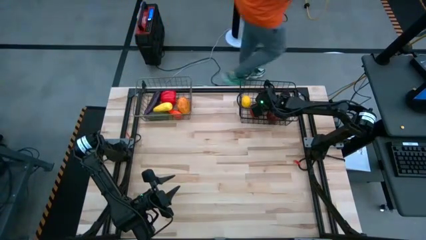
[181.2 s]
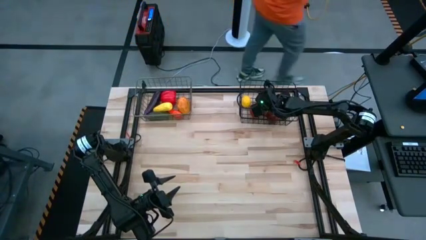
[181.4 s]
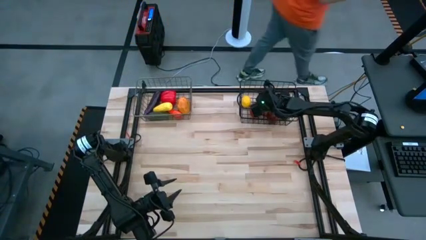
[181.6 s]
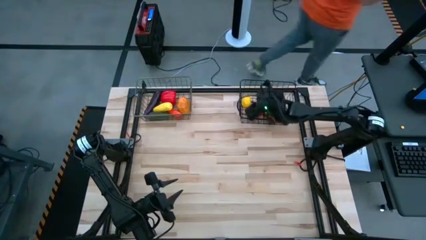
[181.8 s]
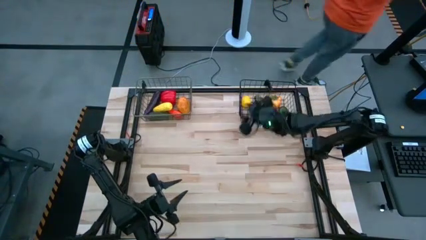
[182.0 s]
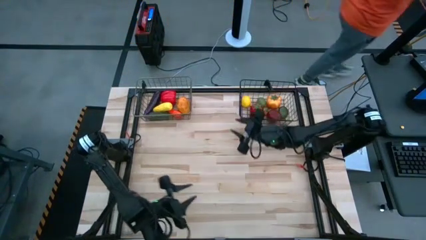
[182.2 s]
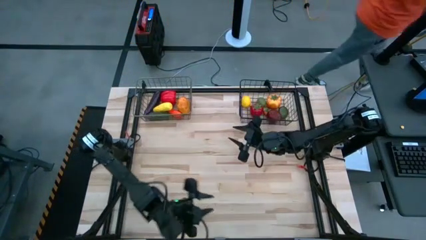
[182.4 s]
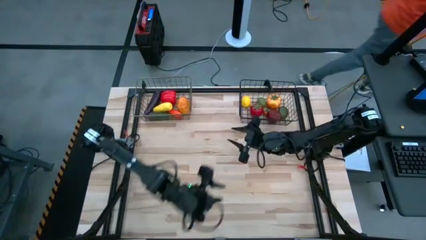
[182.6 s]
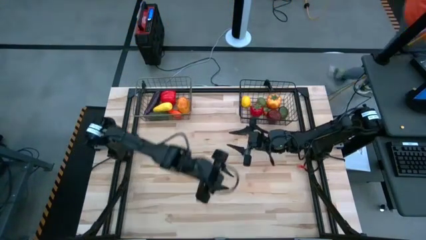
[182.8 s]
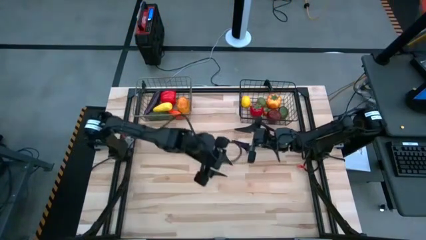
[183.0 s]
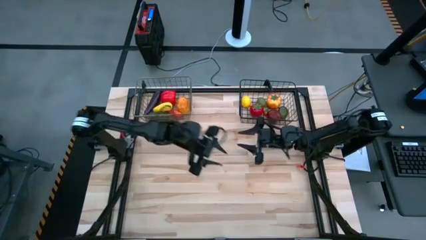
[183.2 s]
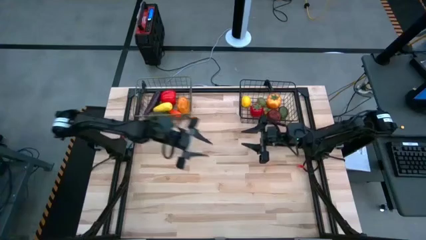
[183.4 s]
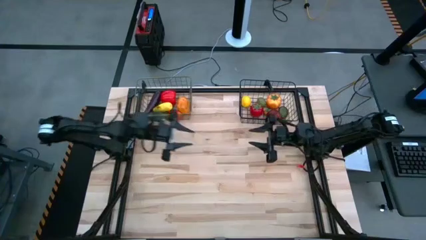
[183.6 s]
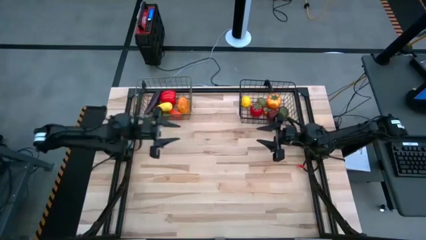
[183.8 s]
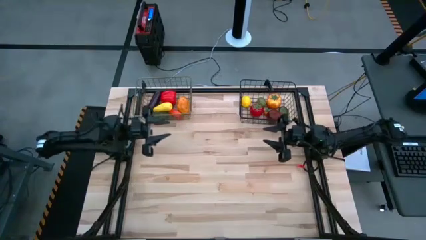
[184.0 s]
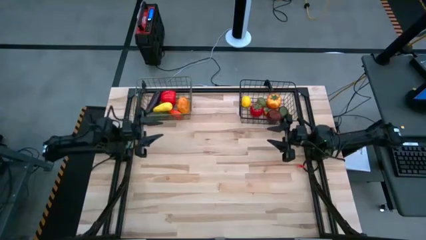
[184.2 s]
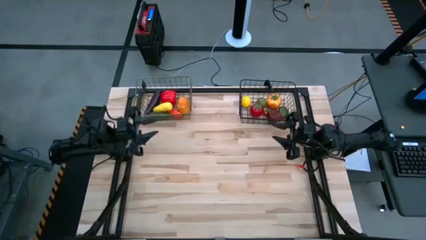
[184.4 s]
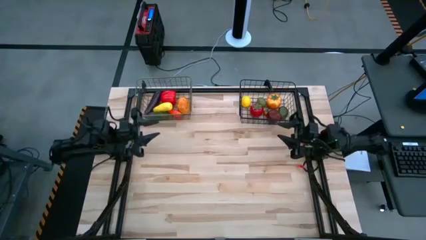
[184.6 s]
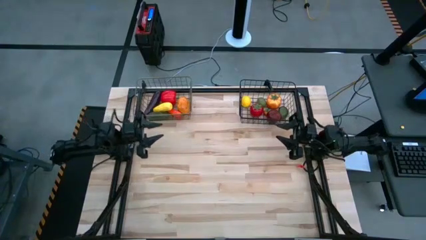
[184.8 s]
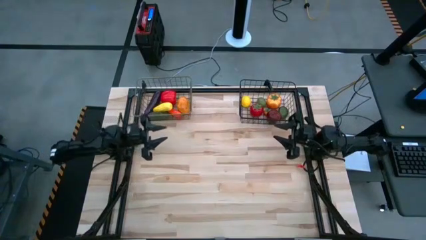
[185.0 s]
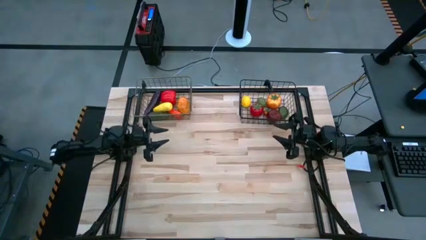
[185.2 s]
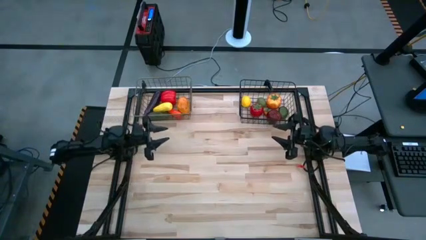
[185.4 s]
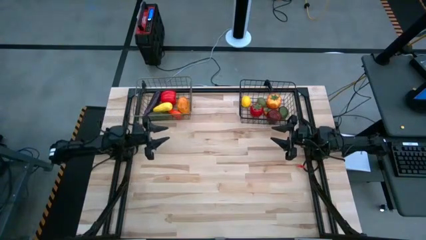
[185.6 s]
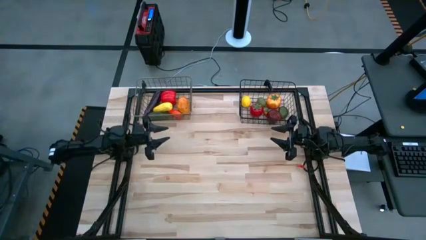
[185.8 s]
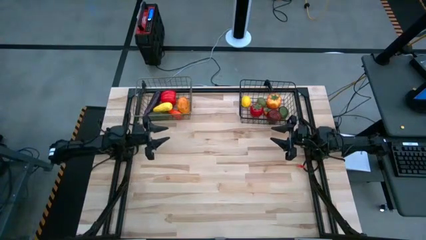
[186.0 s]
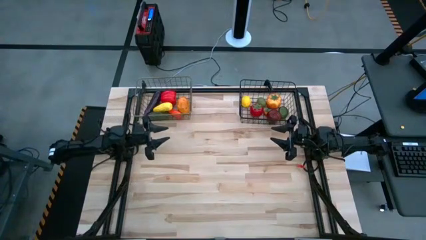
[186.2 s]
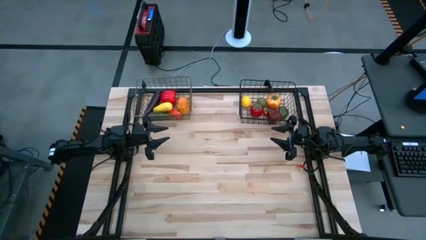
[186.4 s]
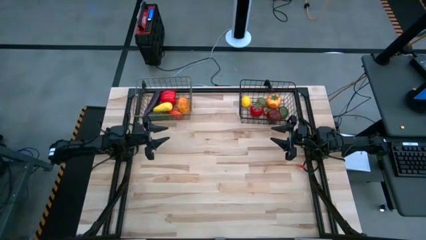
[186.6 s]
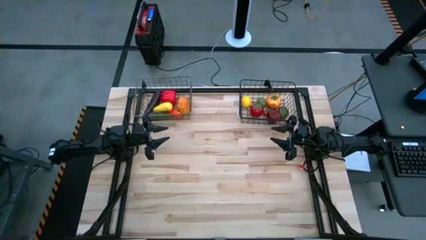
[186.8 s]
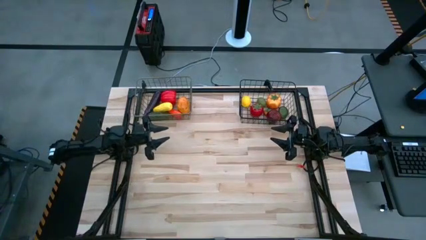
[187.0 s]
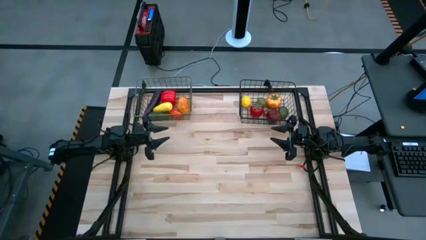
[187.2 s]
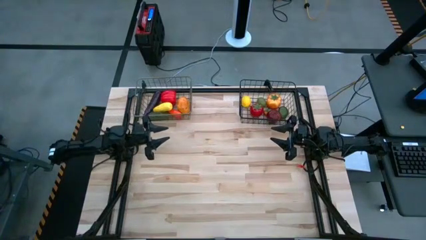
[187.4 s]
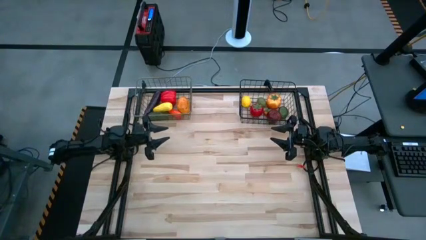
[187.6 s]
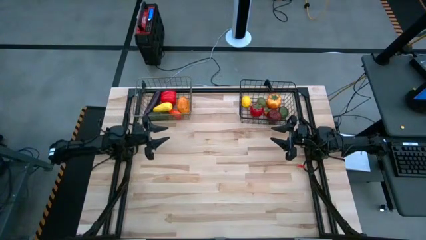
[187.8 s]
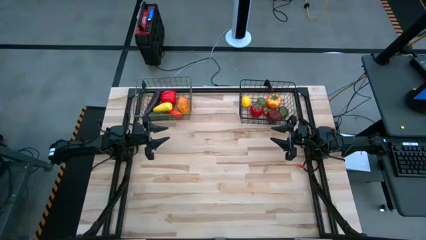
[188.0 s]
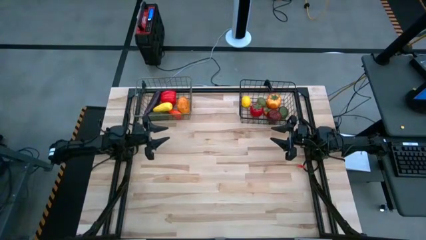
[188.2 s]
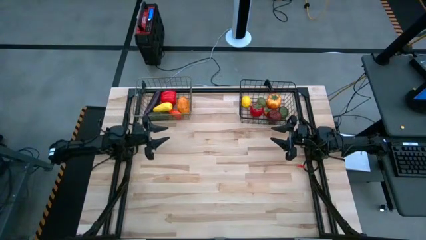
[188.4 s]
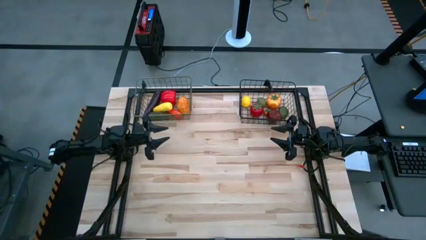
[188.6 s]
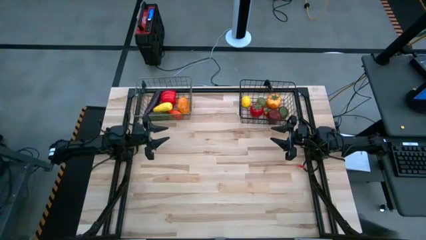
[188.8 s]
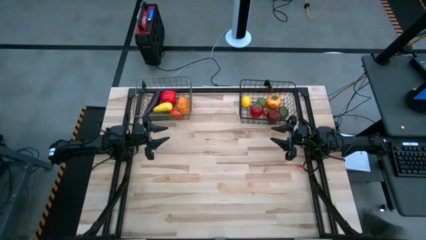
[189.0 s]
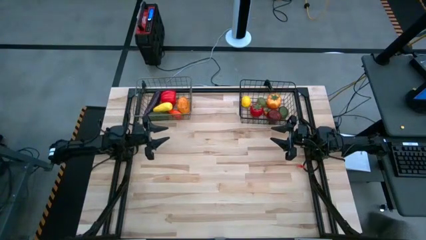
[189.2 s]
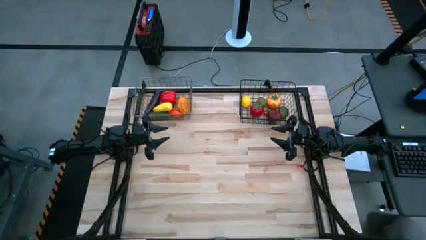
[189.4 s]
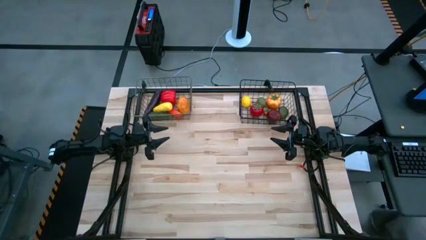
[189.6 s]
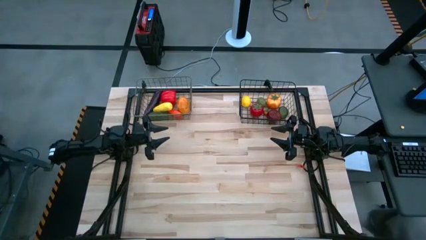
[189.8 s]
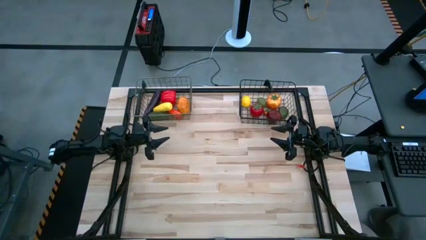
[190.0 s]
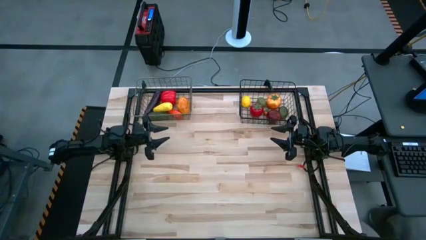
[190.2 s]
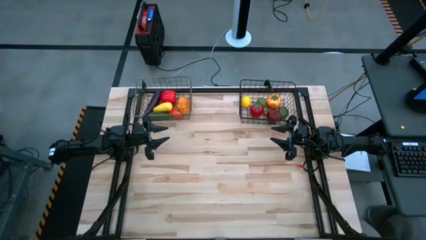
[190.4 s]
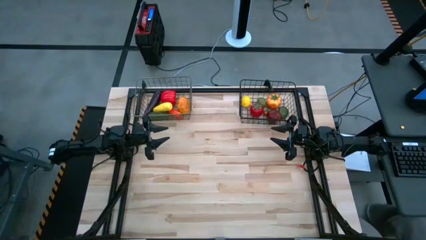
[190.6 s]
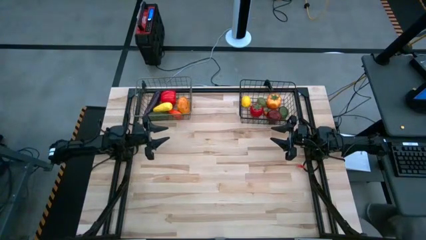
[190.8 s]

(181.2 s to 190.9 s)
Task: Sort produce into baskets
Return to Home Position

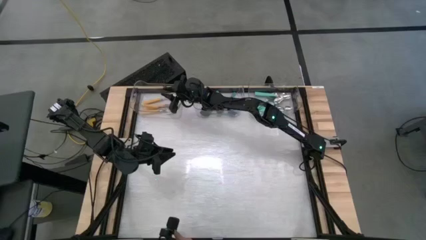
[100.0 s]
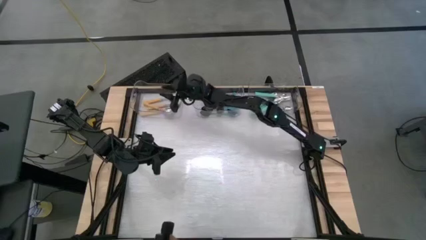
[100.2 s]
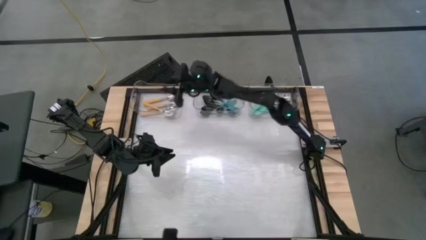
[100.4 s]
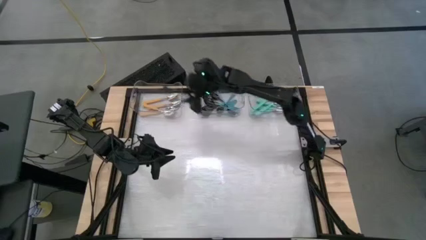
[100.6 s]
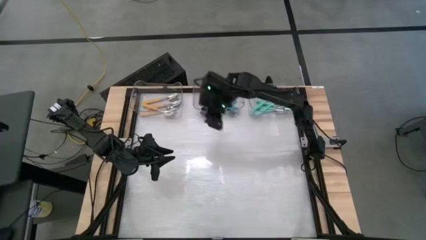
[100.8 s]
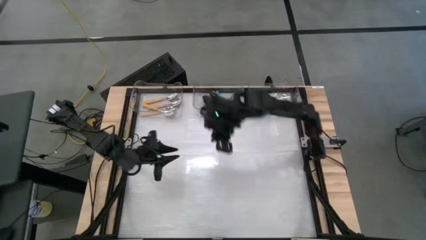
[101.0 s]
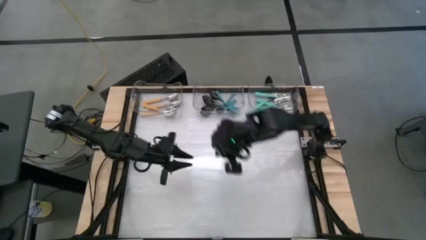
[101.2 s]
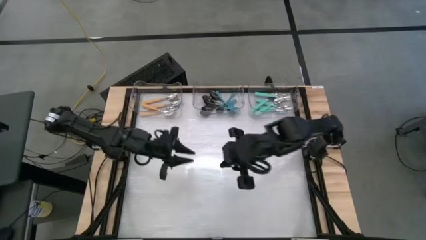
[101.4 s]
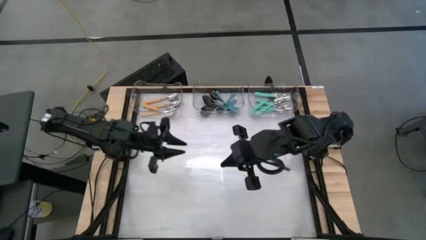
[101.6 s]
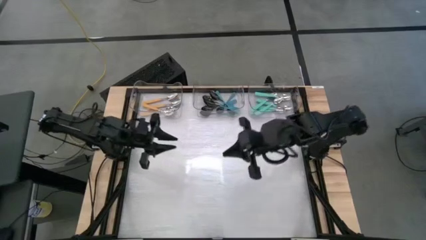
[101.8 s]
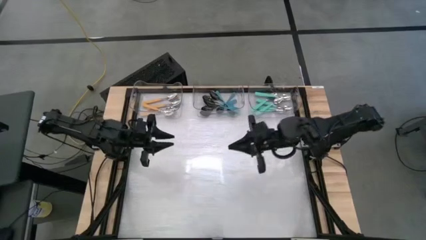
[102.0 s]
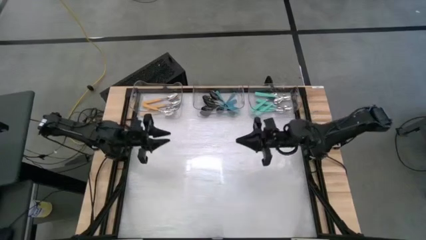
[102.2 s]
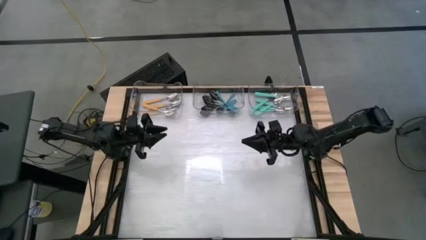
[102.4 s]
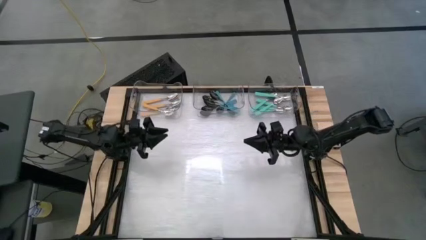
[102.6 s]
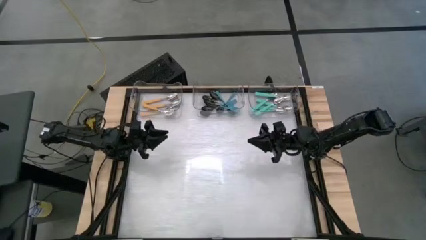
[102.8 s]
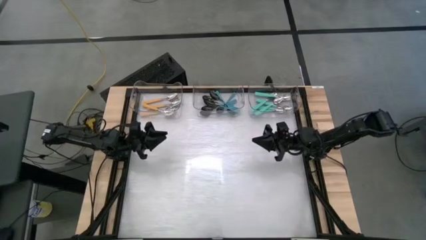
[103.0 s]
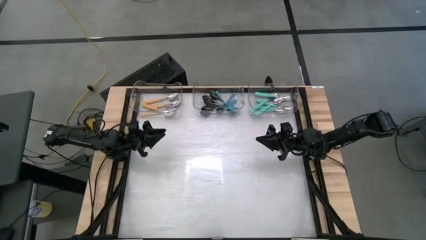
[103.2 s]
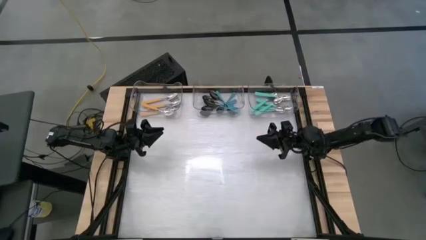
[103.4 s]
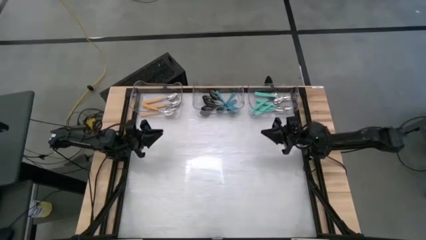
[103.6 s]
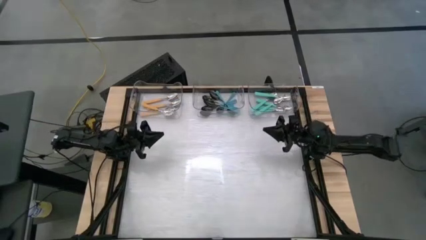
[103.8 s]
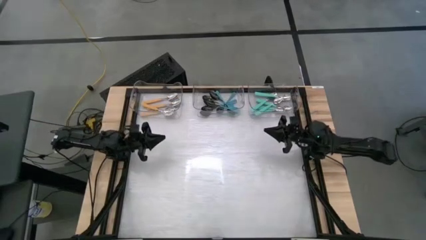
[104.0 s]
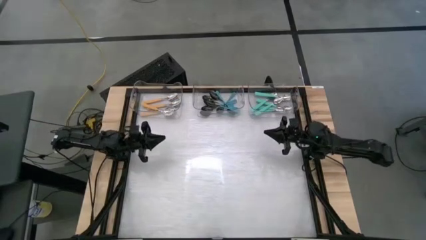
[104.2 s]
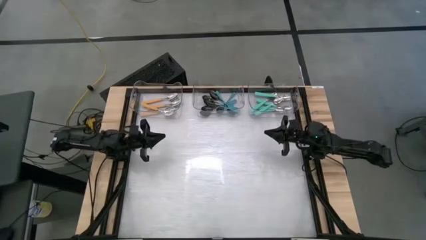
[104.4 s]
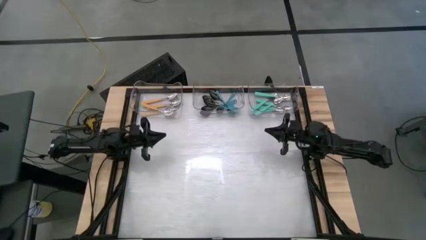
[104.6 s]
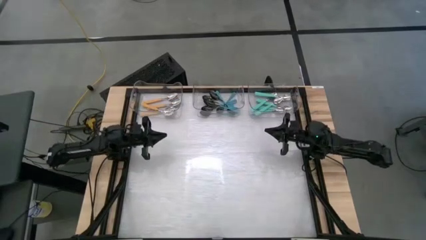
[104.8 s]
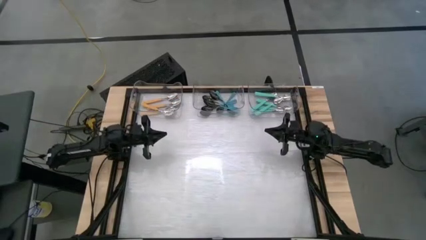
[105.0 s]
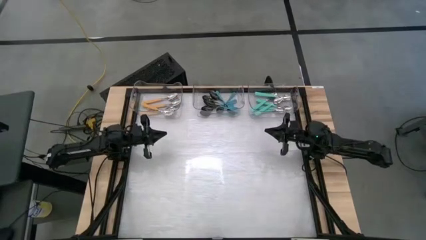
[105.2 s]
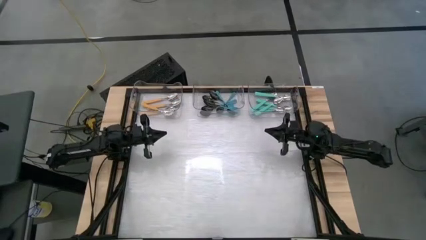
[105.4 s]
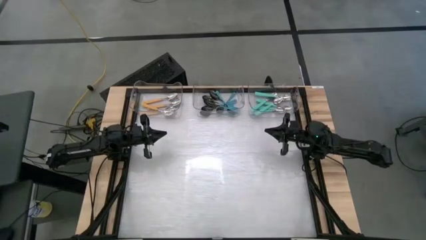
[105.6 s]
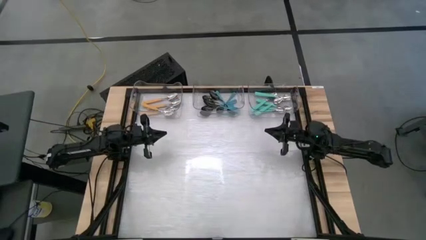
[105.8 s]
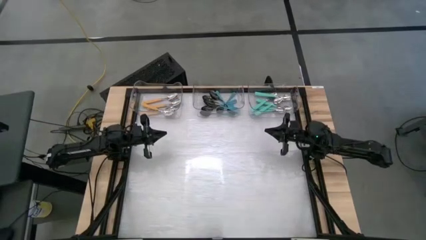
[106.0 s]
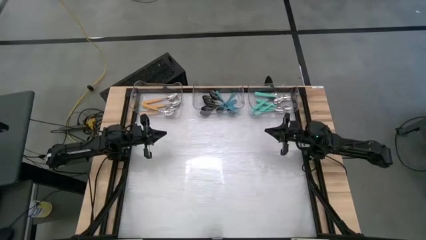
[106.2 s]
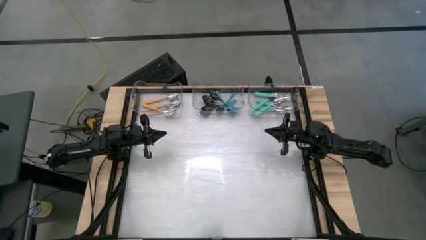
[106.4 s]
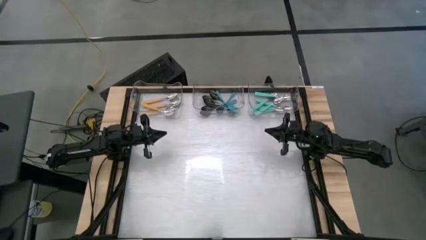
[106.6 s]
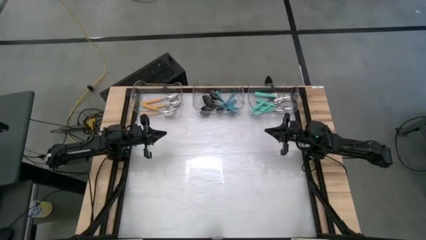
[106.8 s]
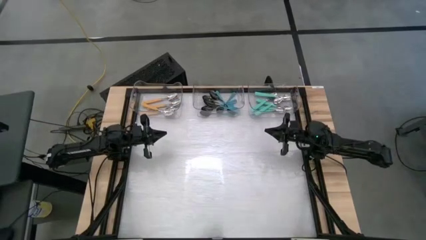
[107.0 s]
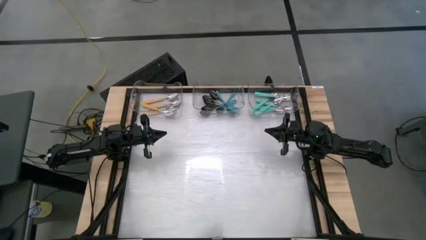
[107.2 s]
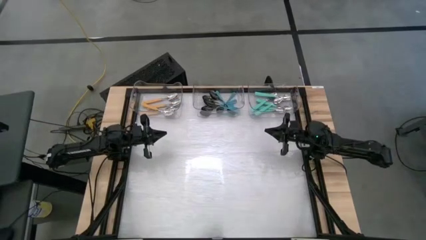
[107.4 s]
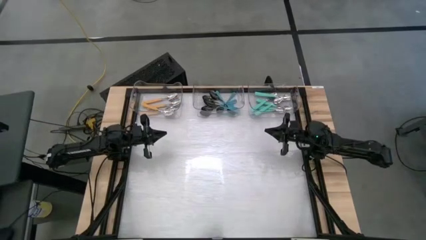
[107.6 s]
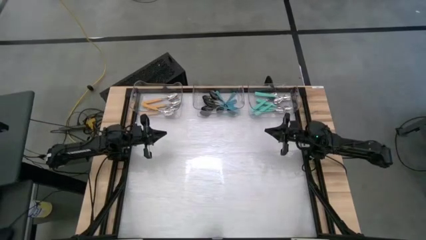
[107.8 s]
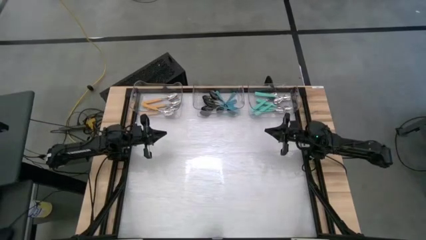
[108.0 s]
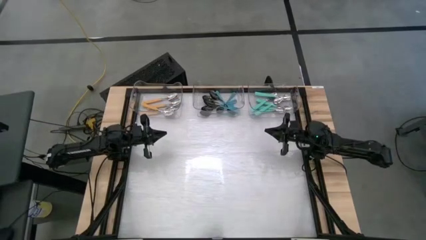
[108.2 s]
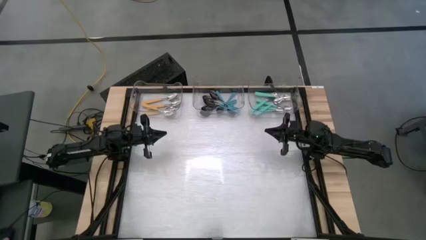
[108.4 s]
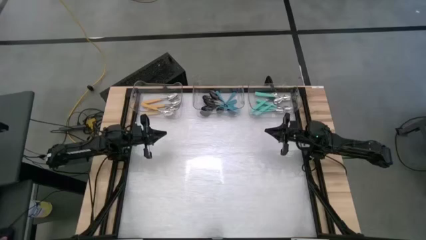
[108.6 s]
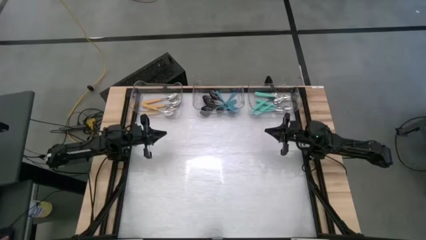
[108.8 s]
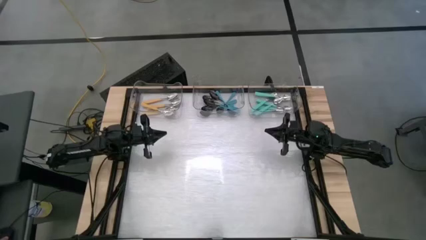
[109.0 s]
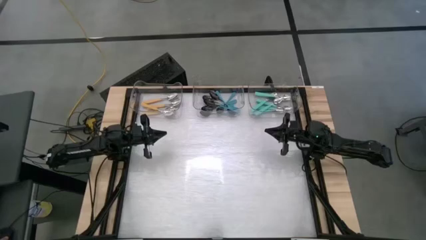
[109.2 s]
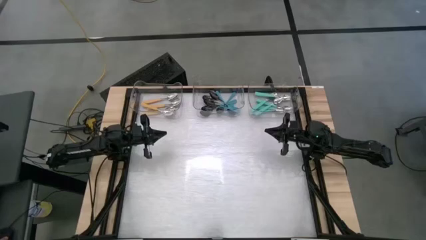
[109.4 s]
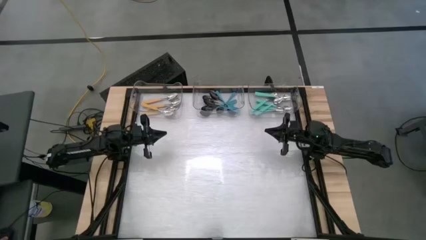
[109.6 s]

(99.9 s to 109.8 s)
Task: Sort silverware by color (type)
Return to Home Position
